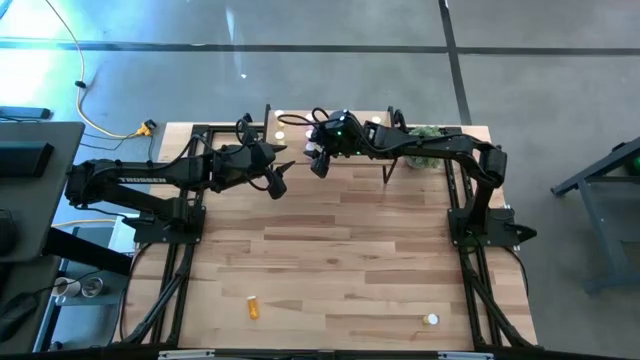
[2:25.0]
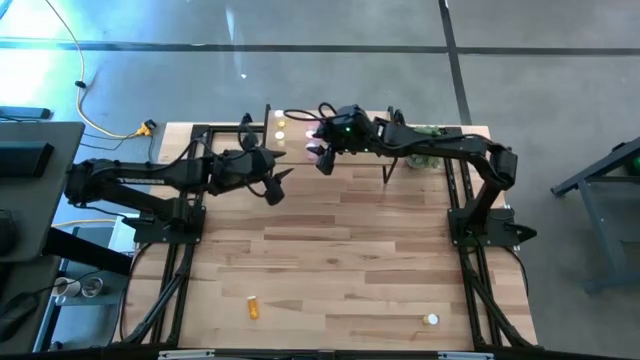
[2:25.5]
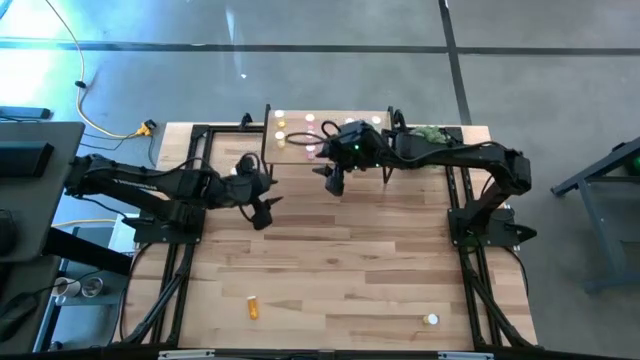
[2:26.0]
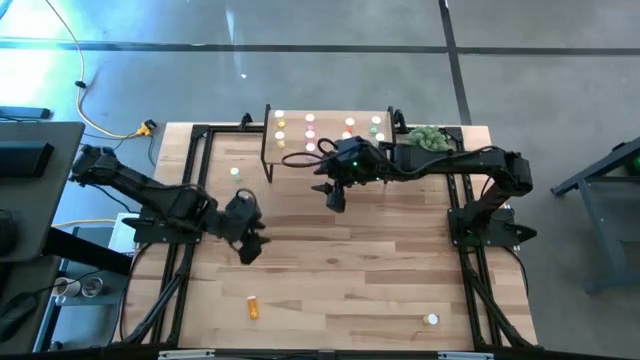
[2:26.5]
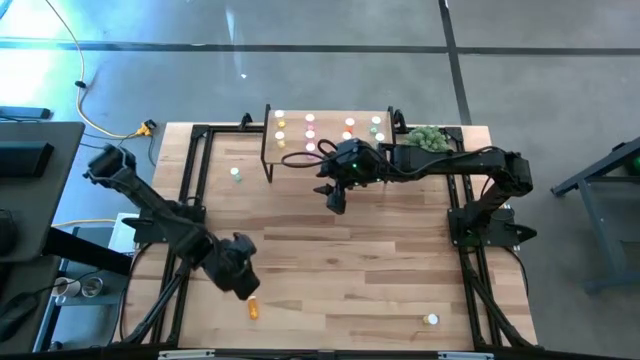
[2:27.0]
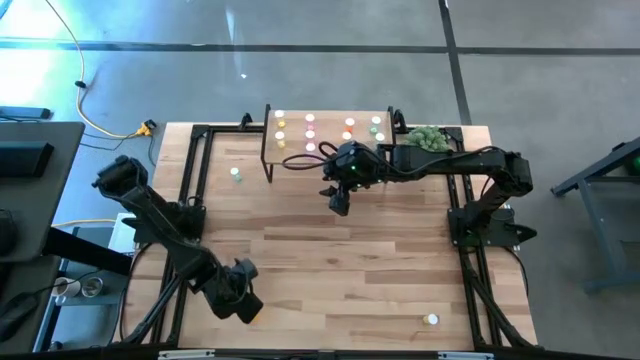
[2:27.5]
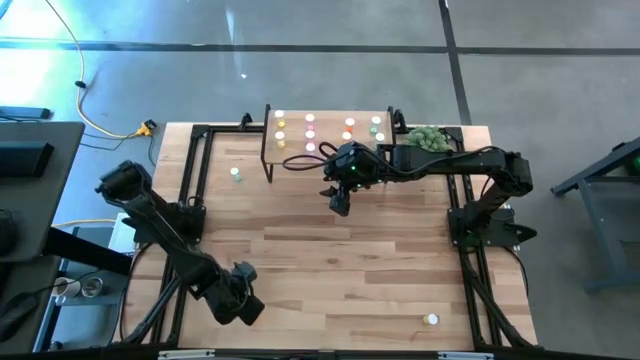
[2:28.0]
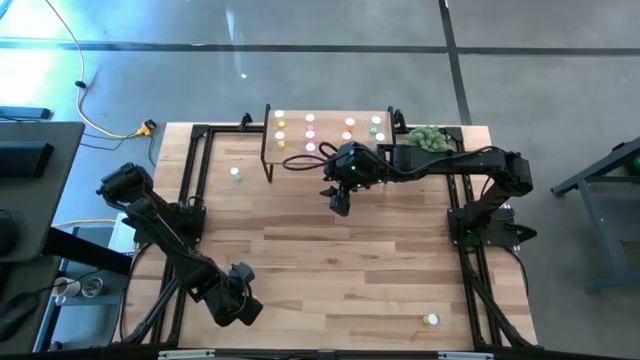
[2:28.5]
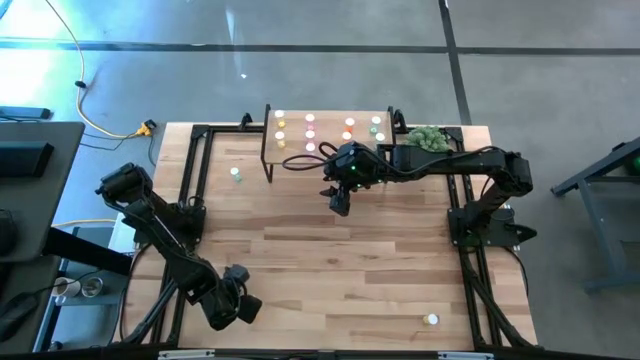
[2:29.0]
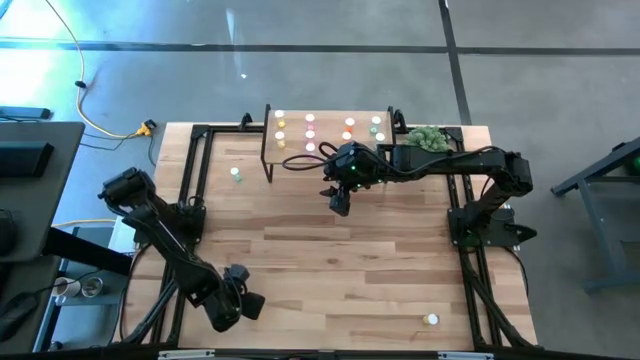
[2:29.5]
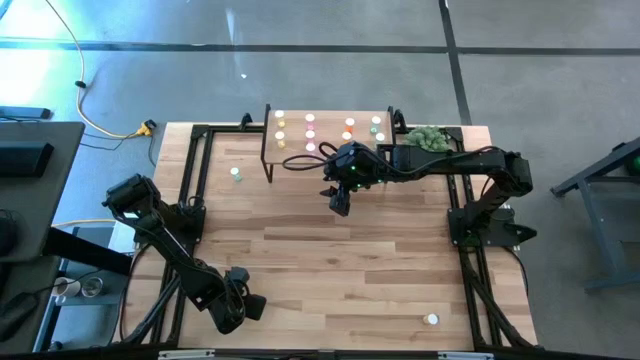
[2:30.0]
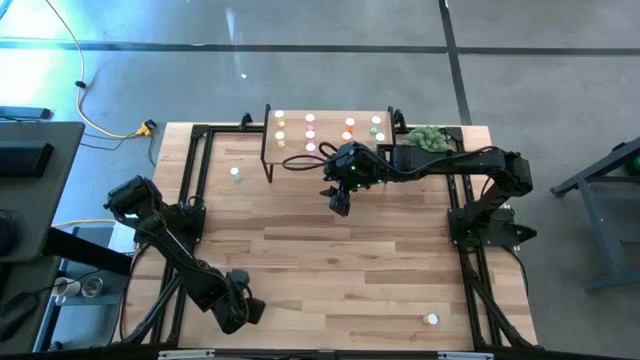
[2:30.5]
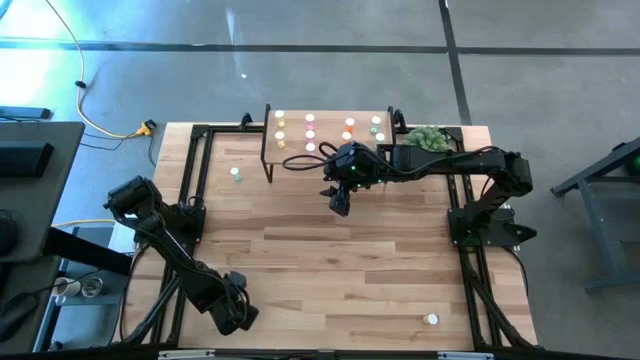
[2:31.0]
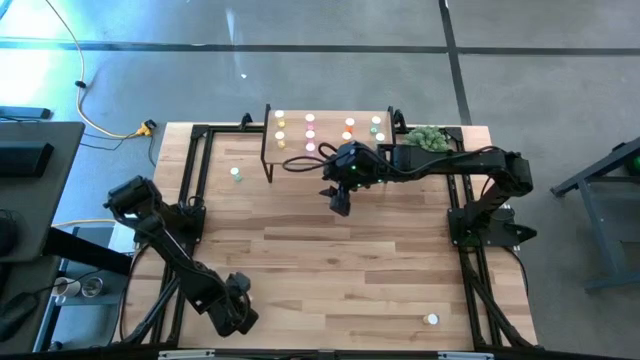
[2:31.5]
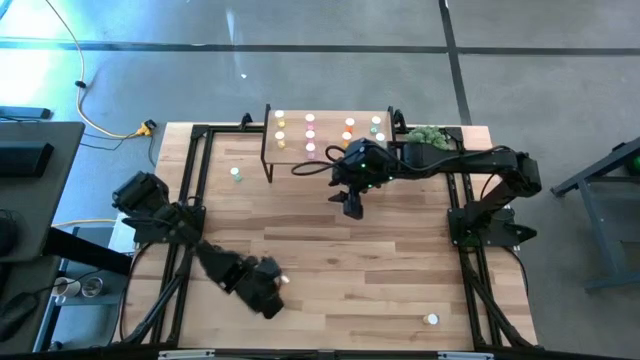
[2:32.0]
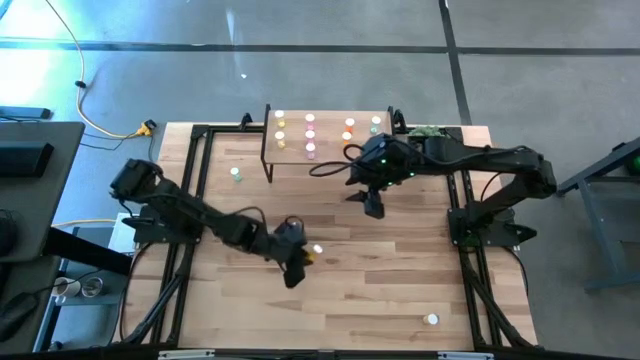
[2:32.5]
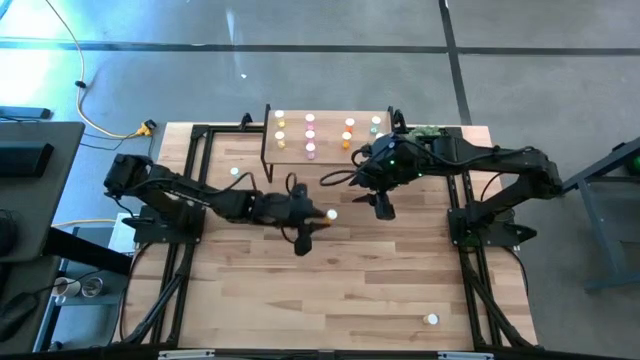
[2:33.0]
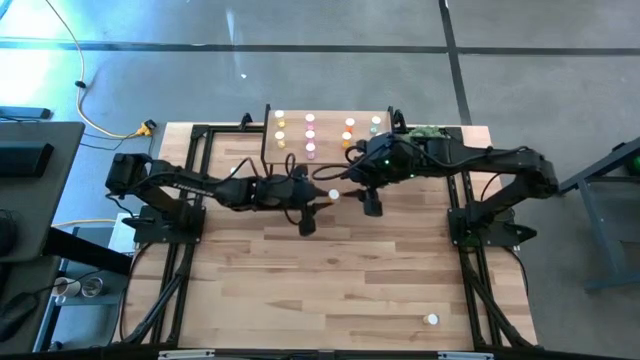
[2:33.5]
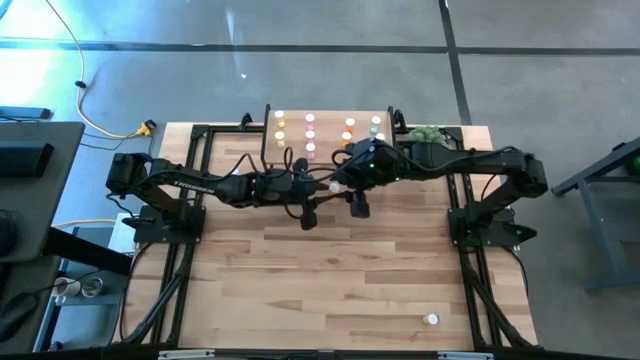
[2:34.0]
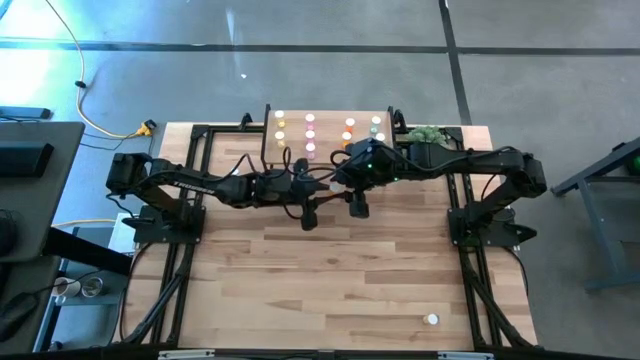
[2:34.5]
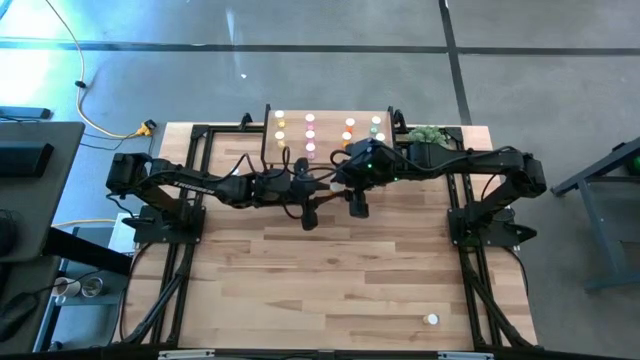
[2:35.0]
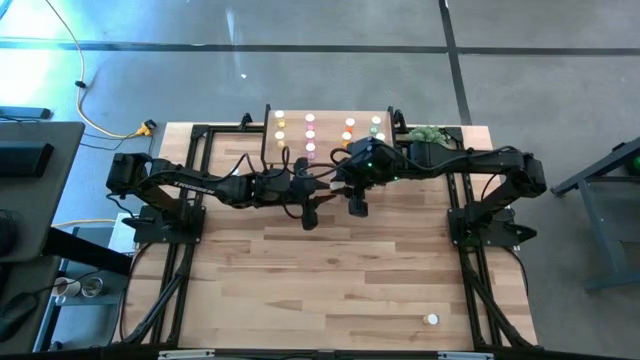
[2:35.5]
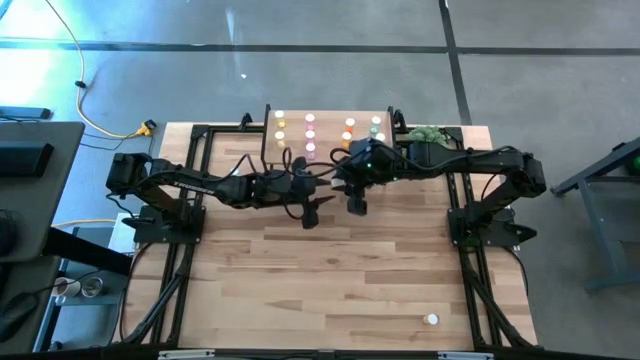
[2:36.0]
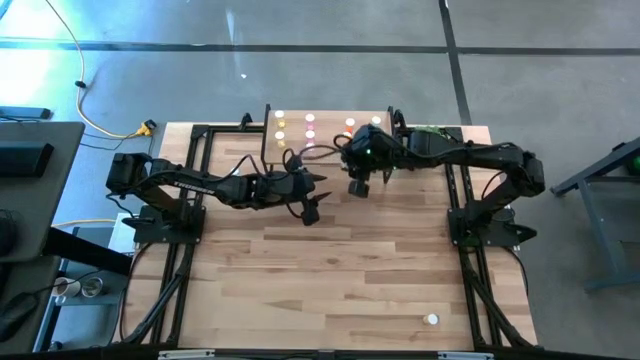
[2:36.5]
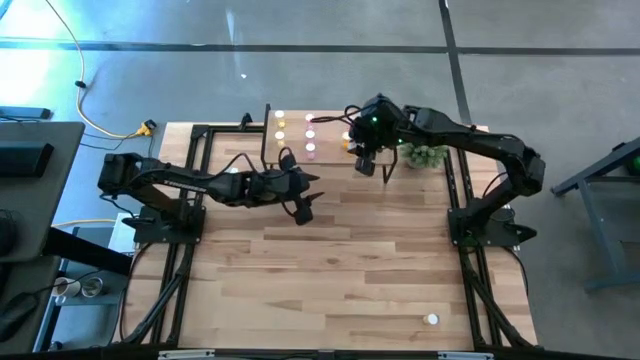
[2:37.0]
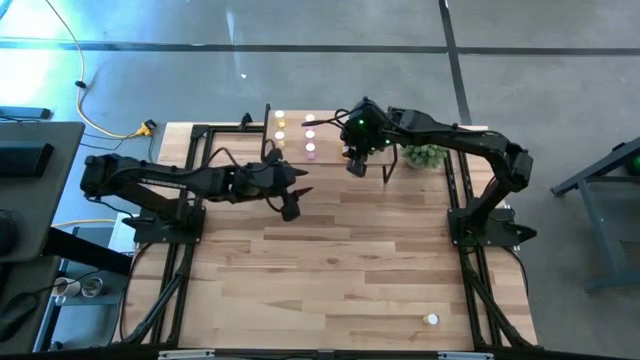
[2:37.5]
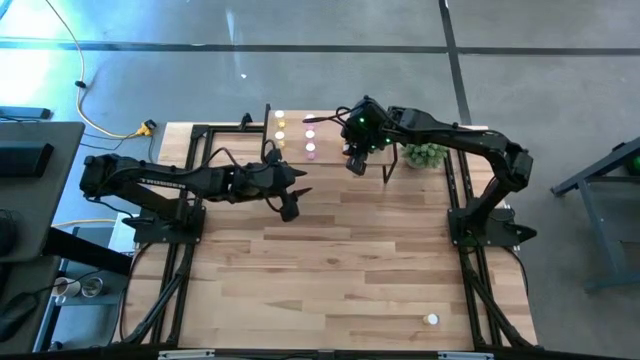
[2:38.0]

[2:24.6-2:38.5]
Task: Pick and place medicine bottles onto shelf by color
Put the orange pill bottle on the shelf aligned with the other orange pill bottles

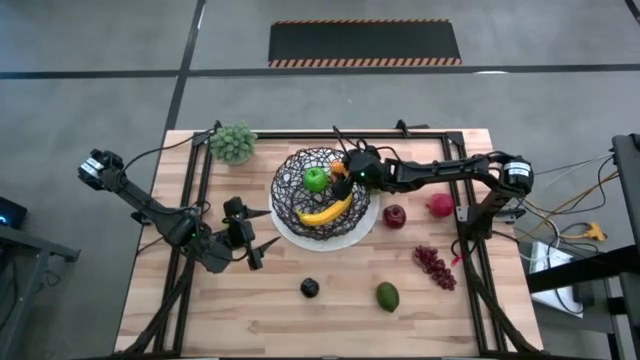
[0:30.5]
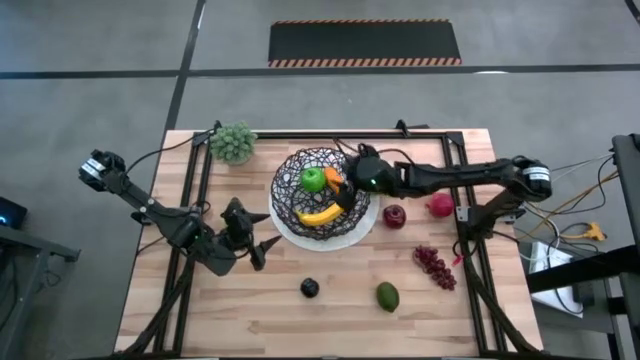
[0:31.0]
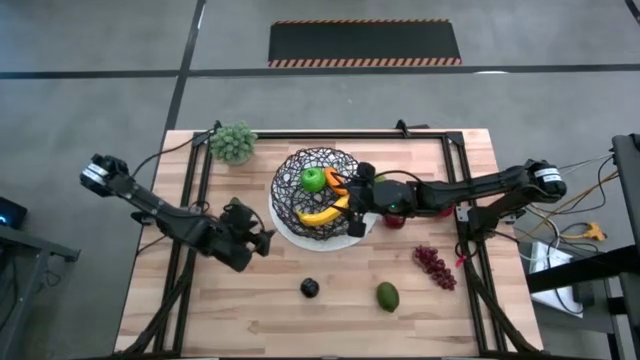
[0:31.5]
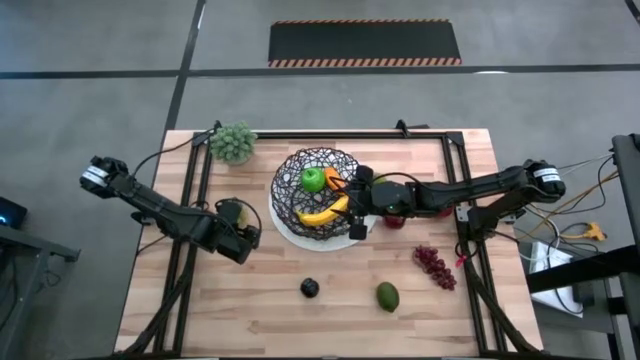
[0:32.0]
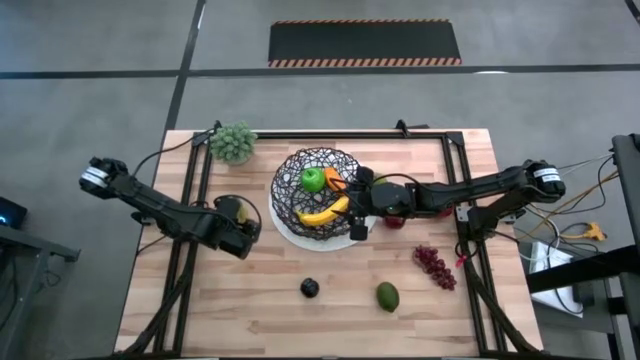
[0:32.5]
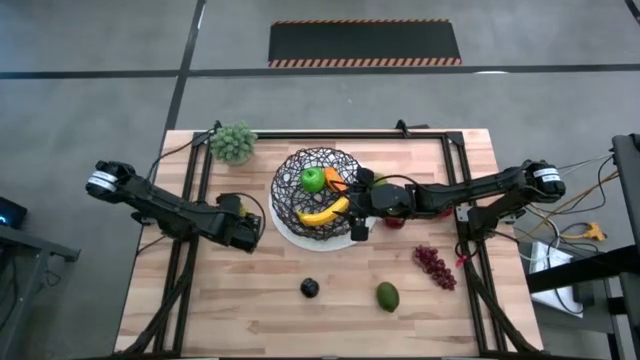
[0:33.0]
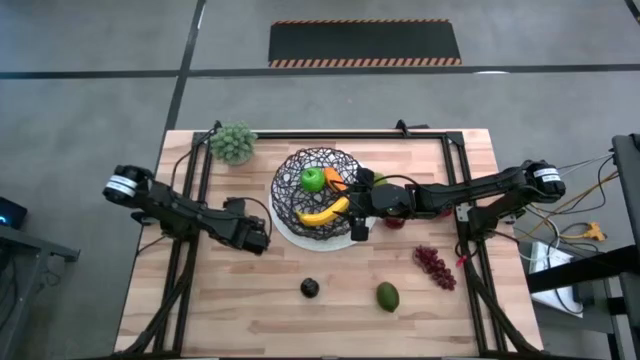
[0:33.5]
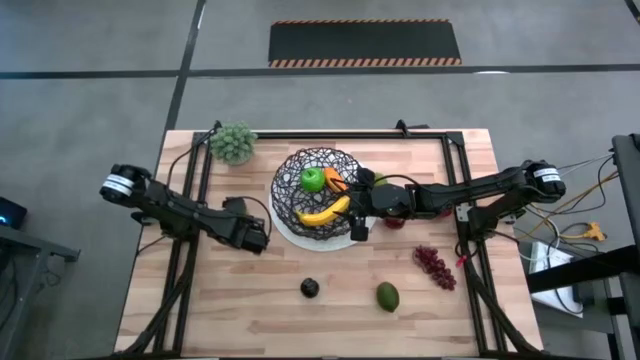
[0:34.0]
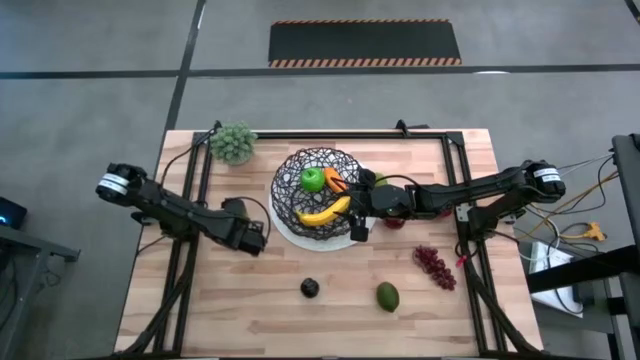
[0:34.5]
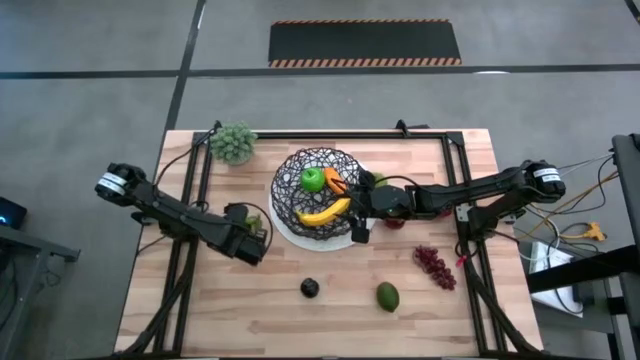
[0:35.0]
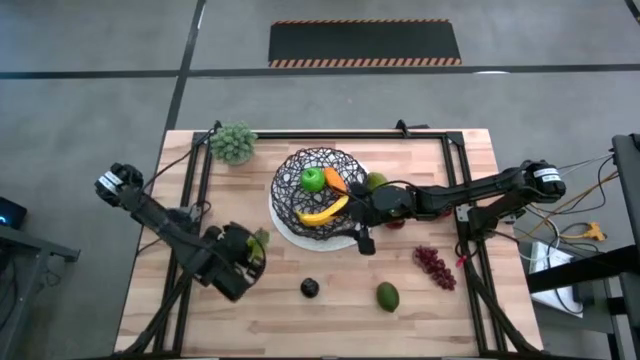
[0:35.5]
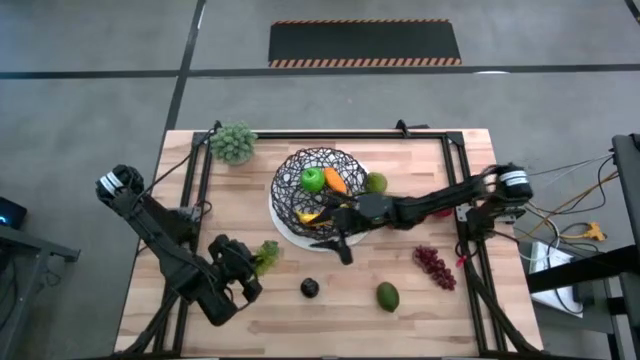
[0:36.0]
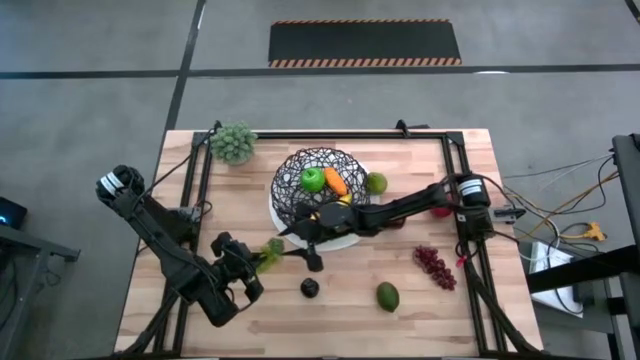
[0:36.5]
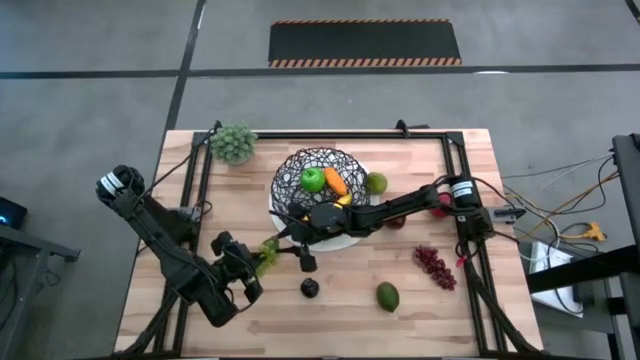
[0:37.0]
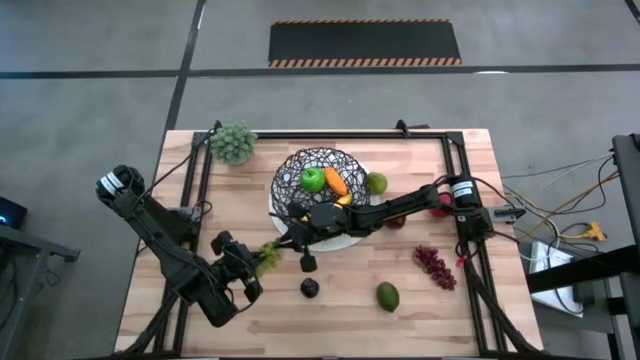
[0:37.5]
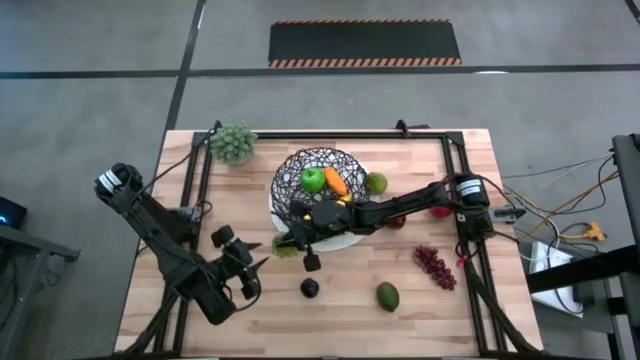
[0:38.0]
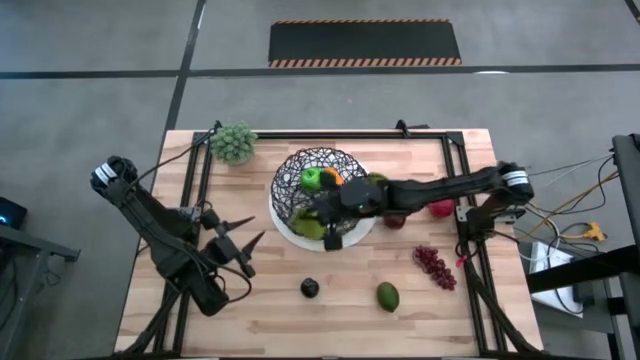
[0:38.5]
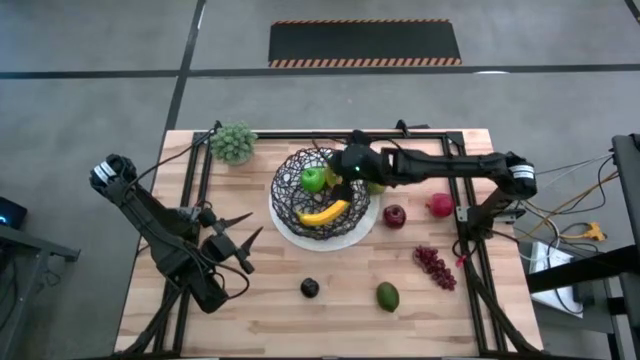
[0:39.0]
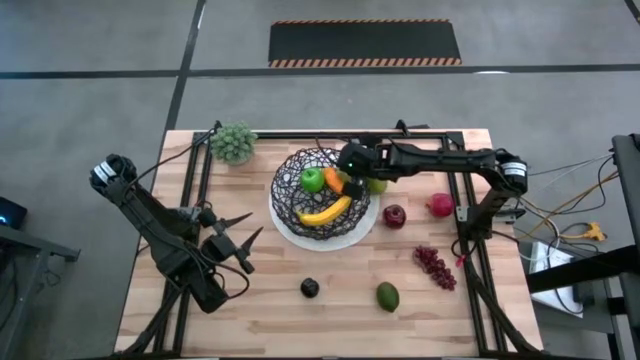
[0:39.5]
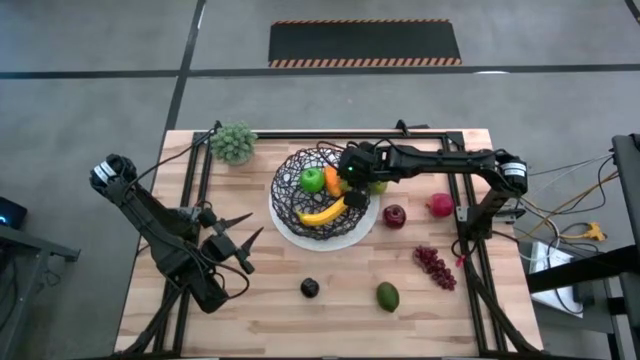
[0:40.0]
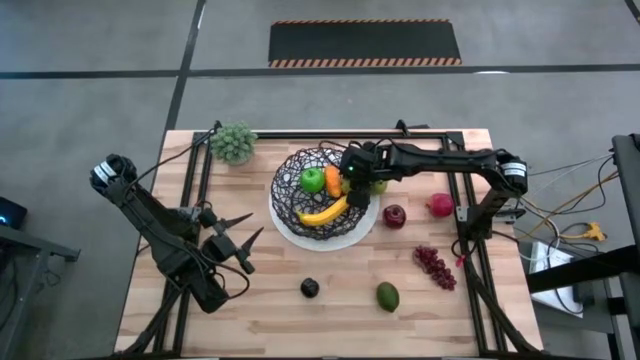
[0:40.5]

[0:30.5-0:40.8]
Task: Build produce basket
Put the green grapes into the wire basket
